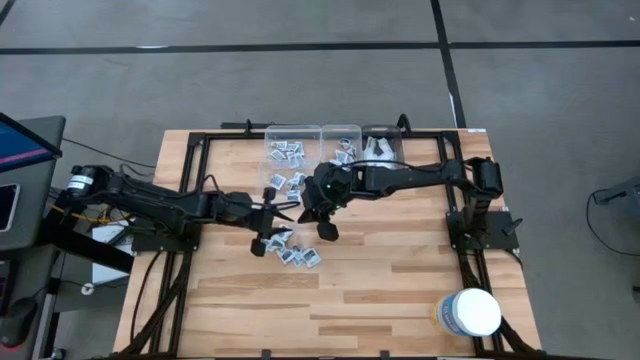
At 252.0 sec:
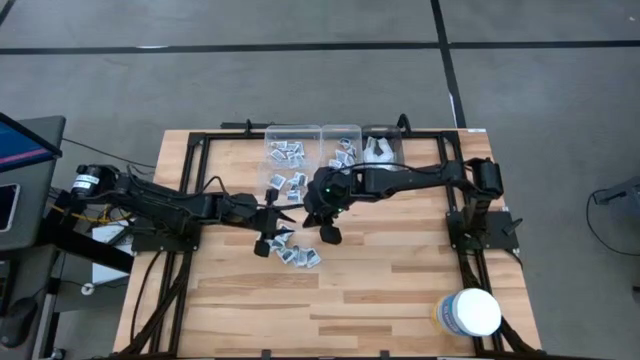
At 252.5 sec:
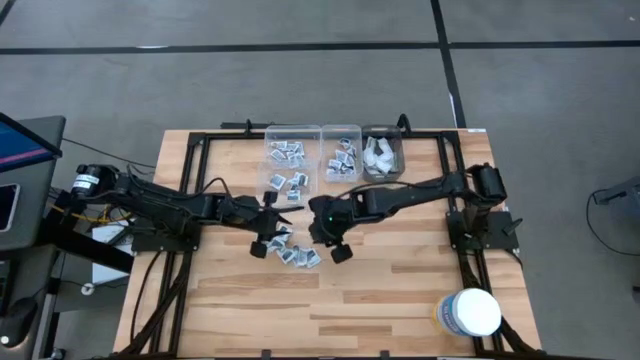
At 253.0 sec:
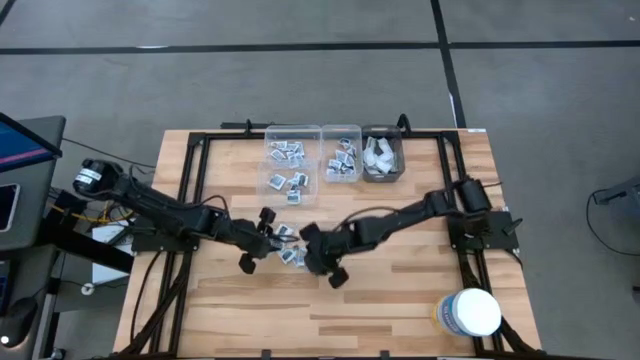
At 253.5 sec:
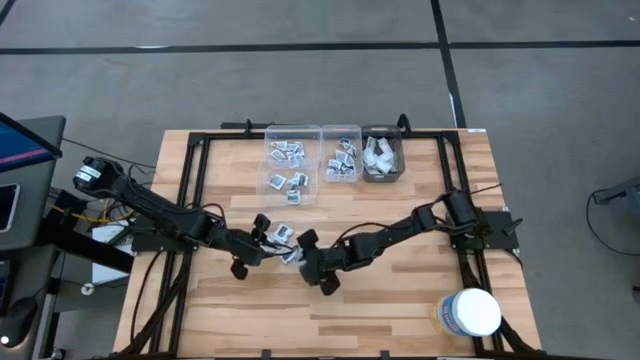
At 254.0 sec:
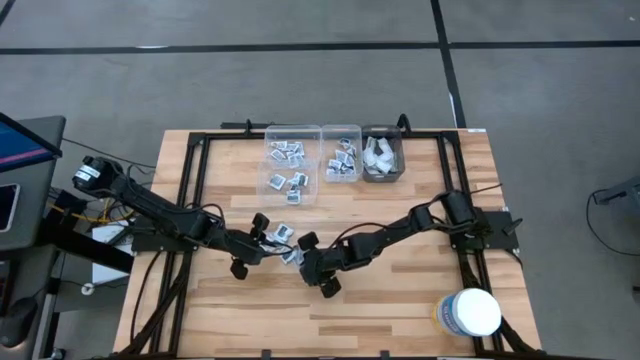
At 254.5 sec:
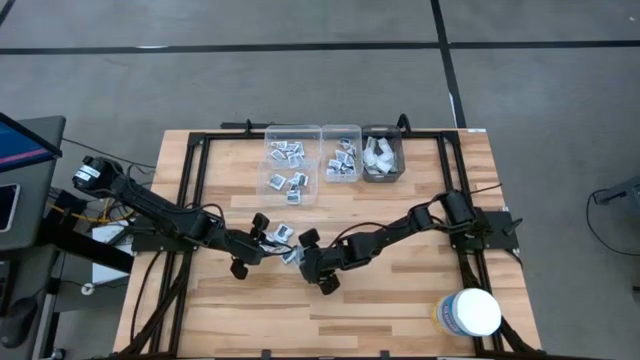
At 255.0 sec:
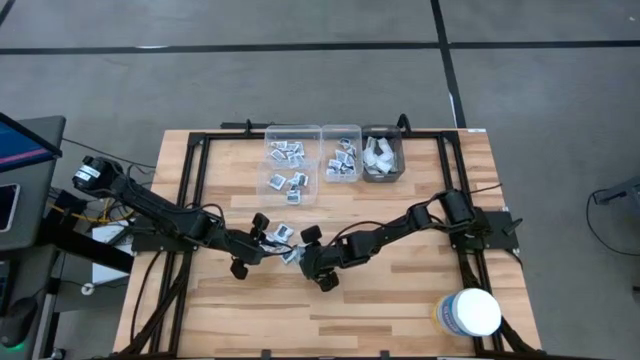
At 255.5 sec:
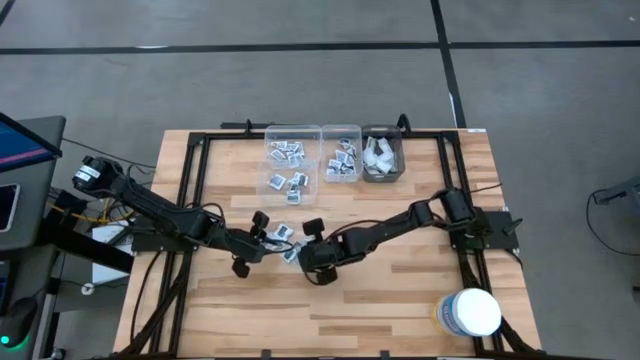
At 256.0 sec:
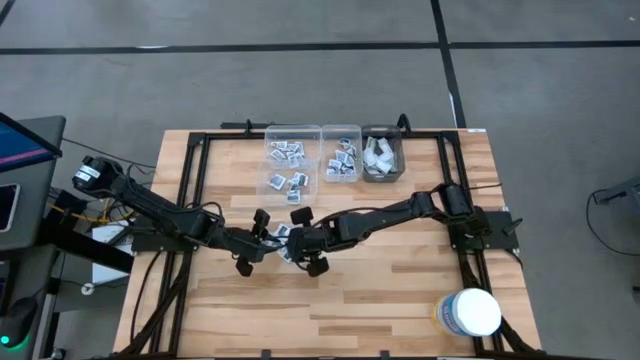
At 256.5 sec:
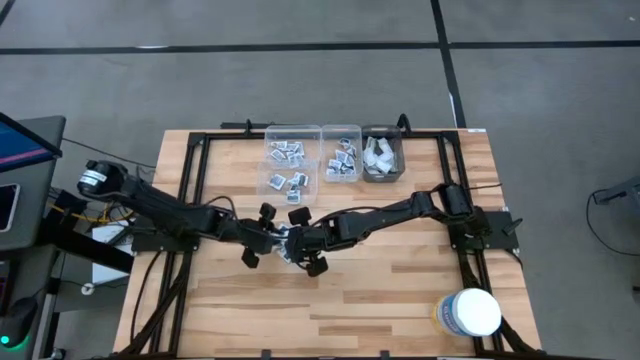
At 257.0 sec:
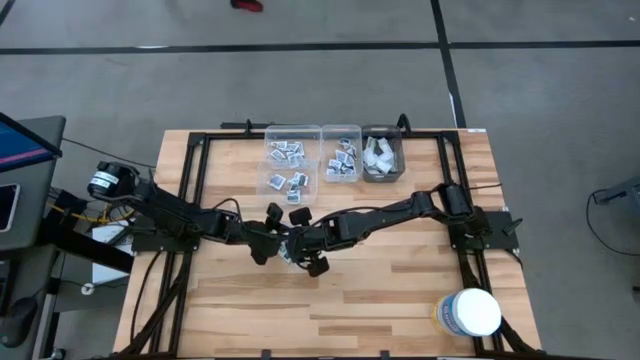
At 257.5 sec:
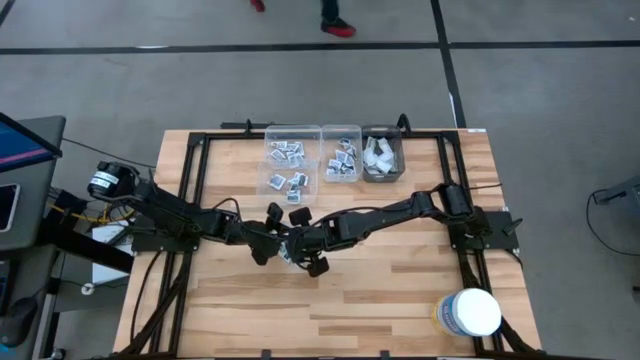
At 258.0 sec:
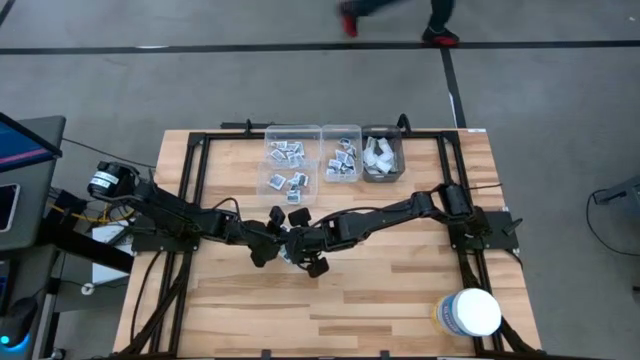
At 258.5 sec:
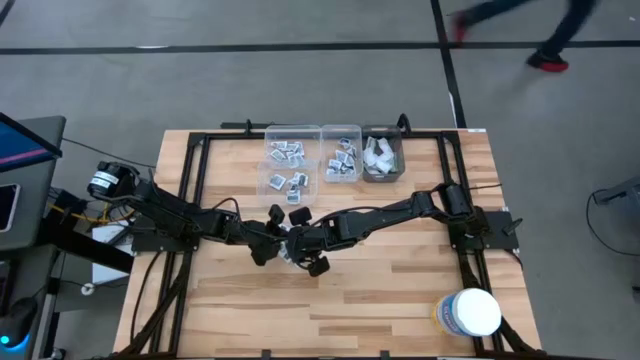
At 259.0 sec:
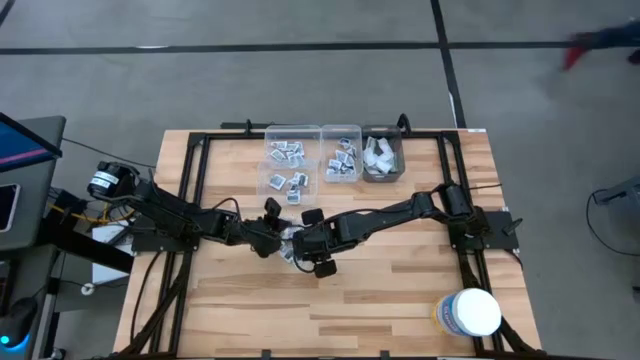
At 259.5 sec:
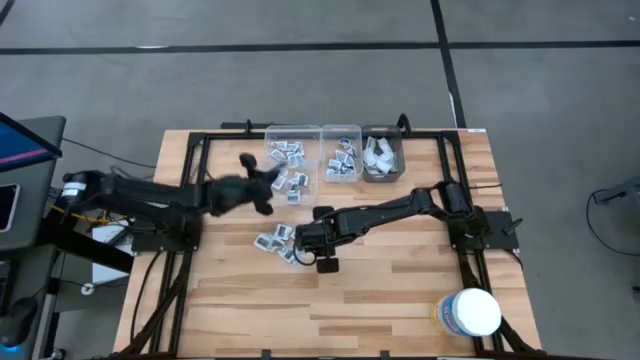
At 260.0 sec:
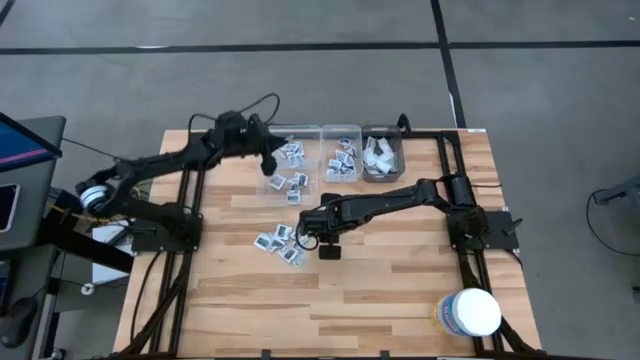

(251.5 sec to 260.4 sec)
Task: Pick & Place First Aid Supplies
Put the ointment pack into the top left transparent bin

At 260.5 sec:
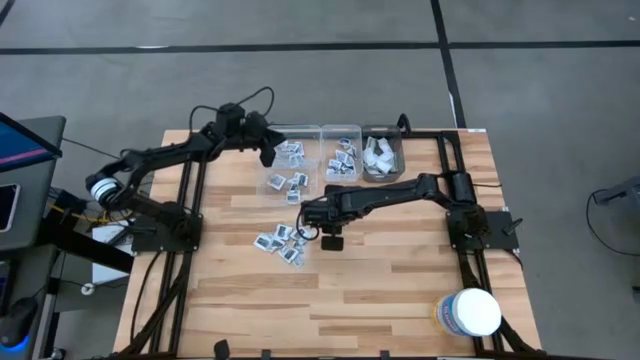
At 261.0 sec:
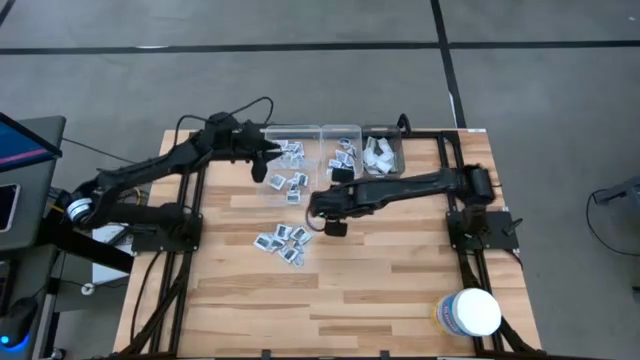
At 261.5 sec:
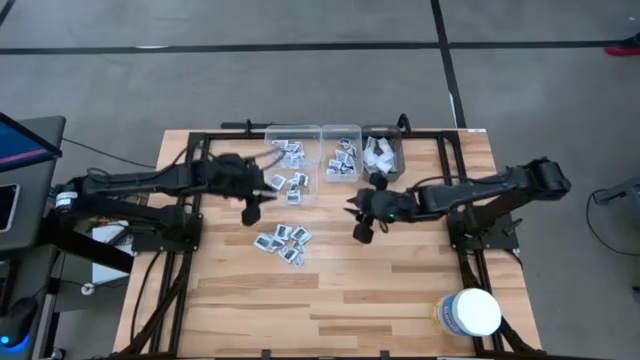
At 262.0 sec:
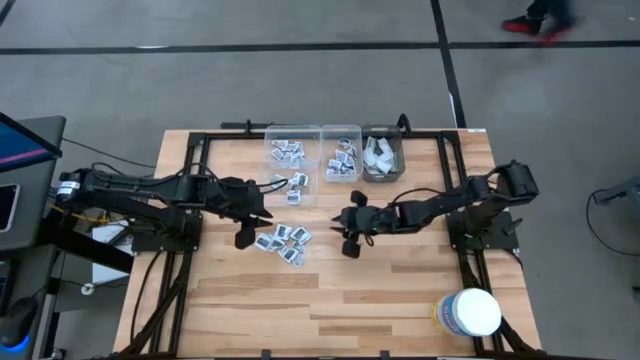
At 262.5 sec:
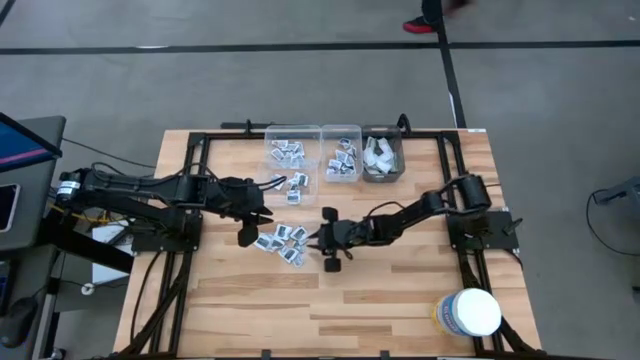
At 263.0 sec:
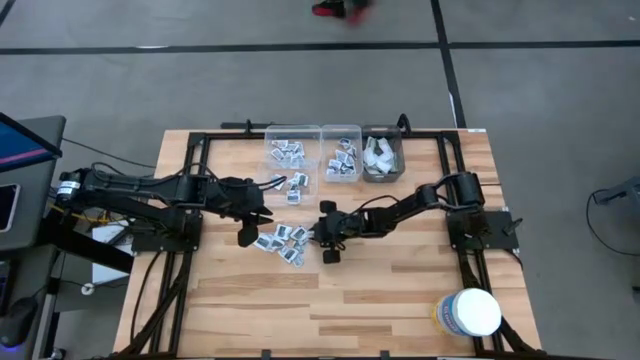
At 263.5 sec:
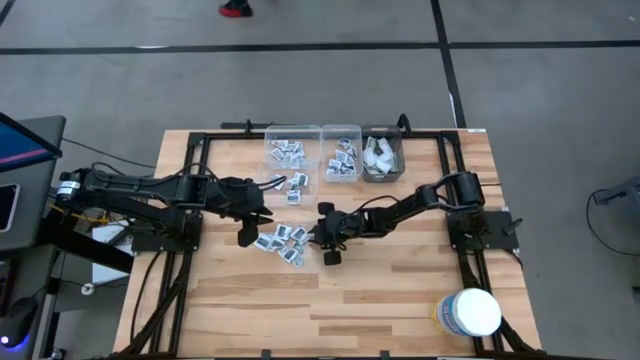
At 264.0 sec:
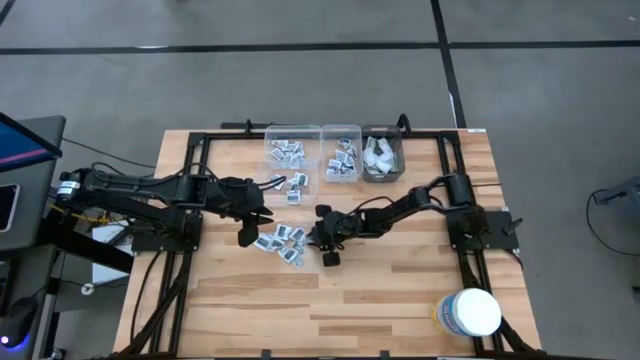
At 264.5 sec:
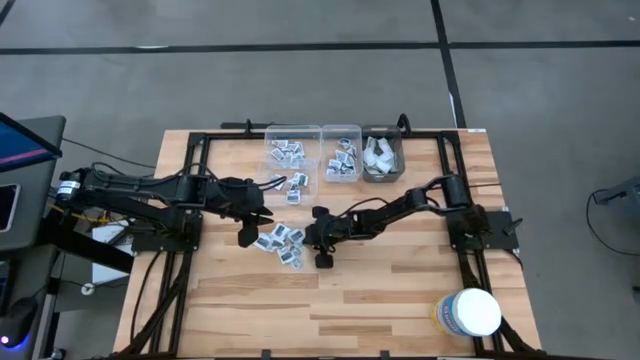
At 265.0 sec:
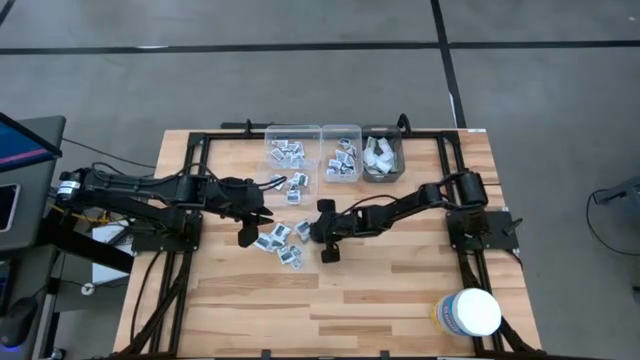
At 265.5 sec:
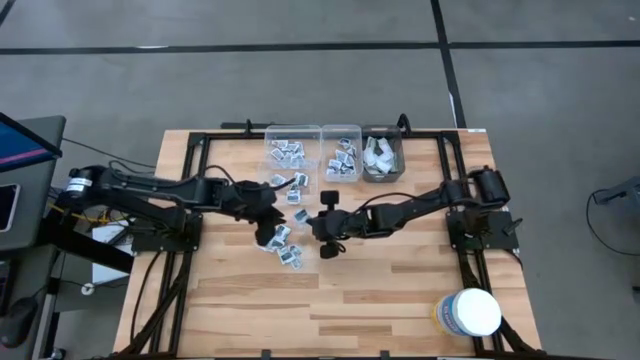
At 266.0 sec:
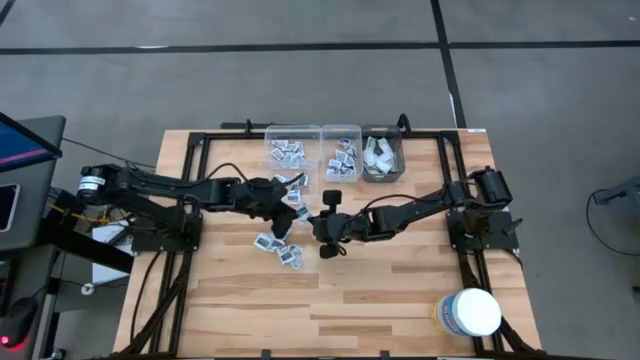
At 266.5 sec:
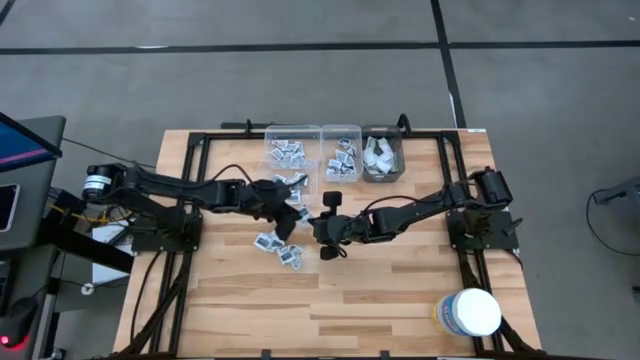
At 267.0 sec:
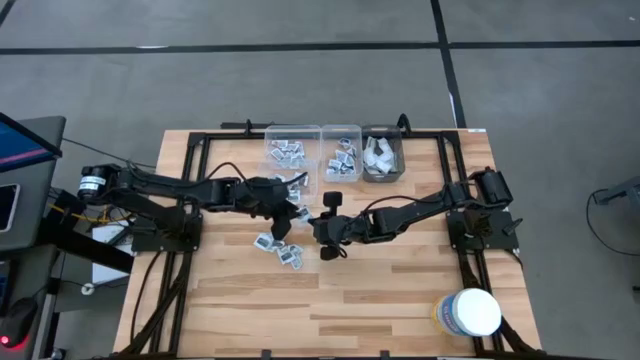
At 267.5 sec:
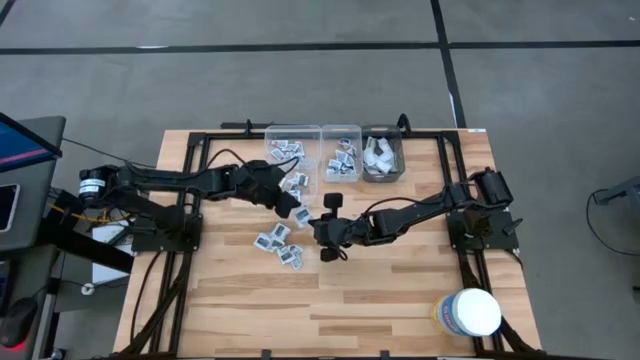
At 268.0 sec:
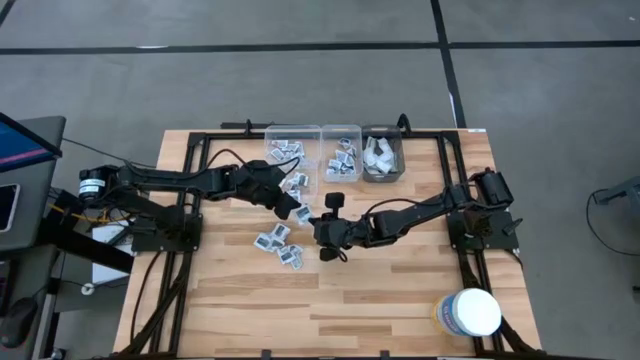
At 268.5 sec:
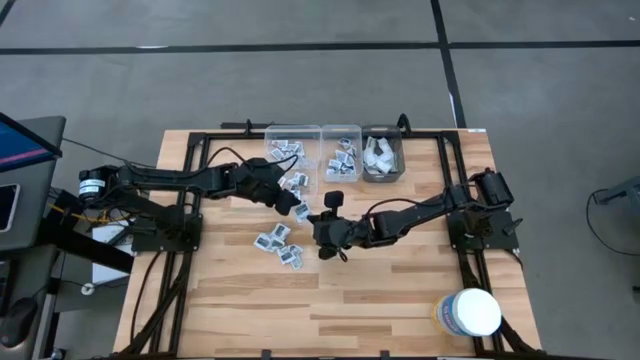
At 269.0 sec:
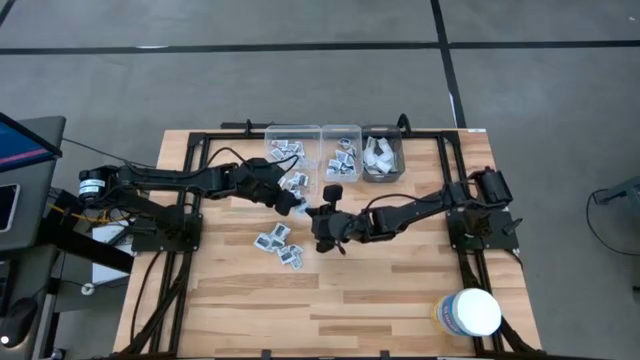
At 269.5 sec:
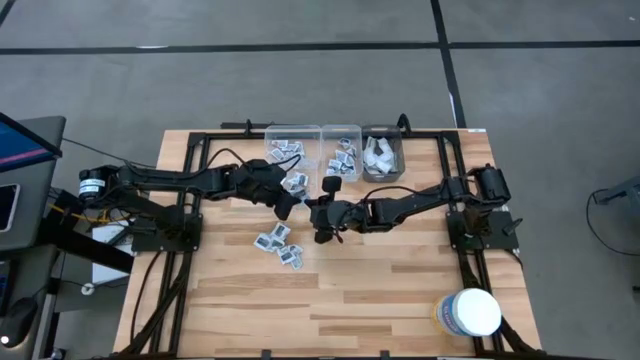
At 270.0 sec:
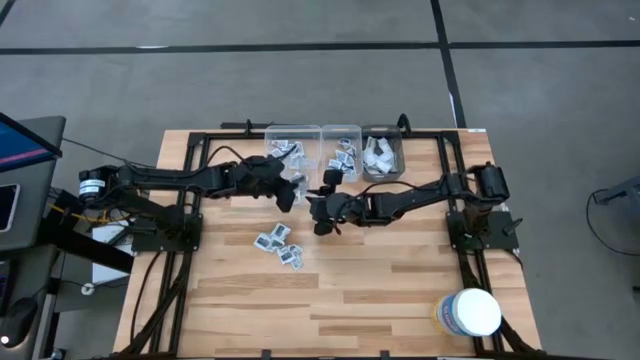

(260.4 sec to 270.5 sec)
Put the towelette pack into the bottom transparent bin
